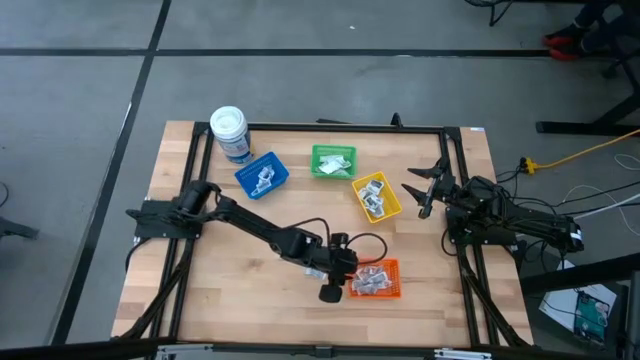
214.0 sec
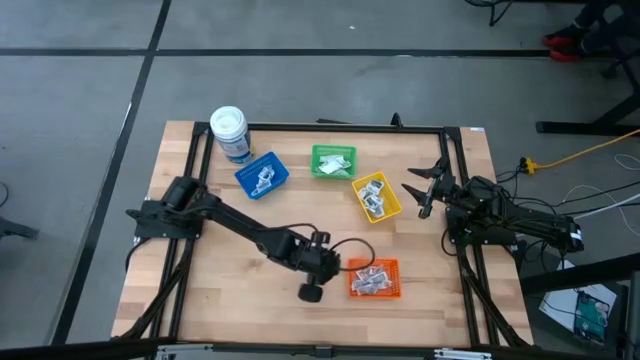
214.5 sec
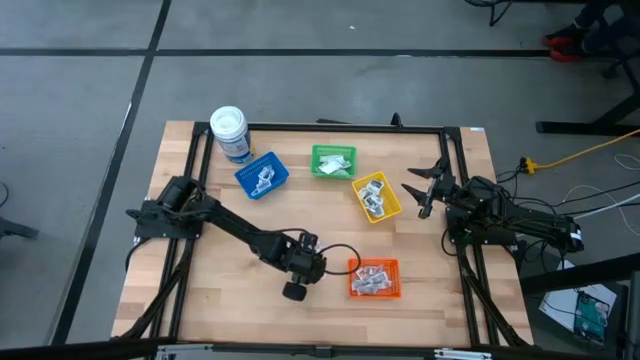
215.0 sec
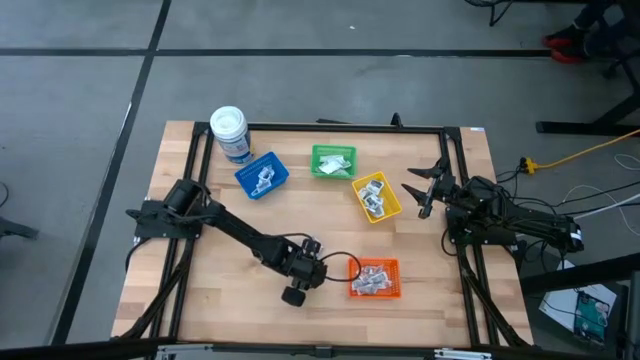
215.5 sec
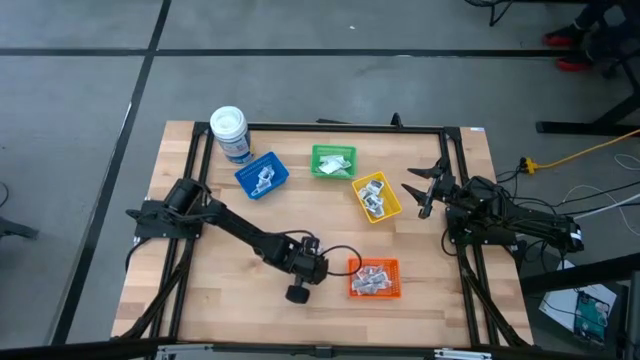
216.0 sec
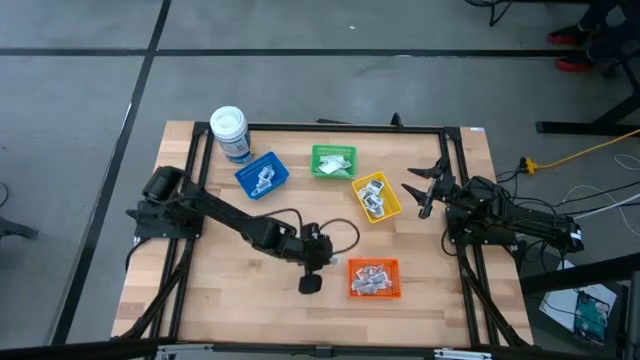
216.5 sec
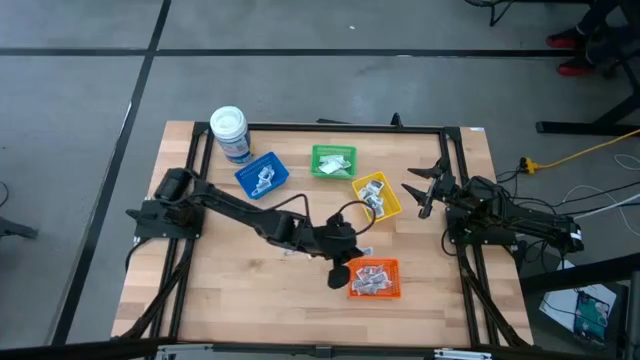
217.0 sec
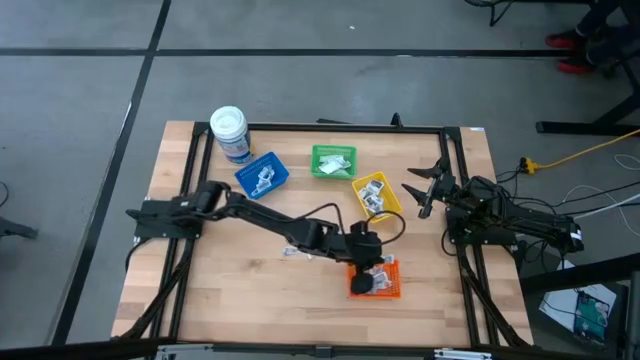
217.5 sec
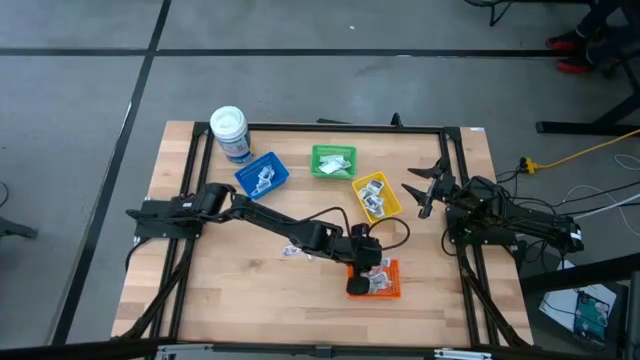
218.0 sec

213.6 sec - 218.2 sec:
Task: Pick & Place First Aid Supplies
Put the white ointment pack into the orange bin

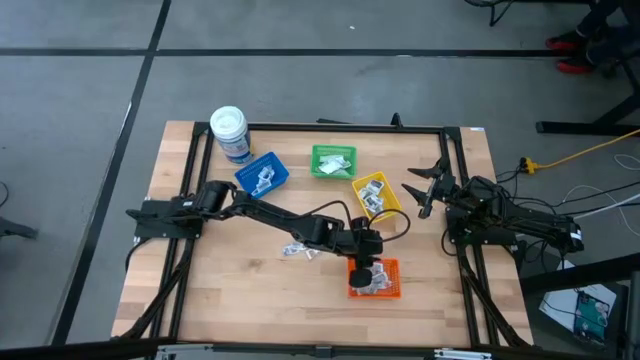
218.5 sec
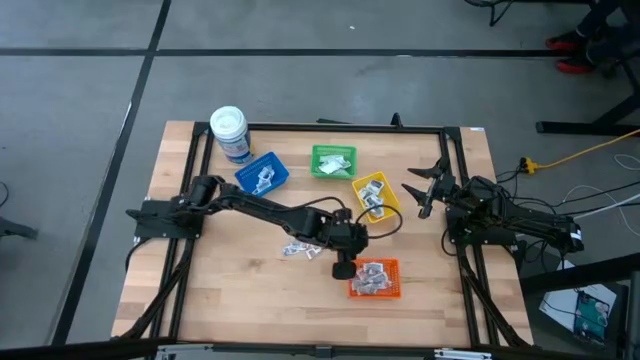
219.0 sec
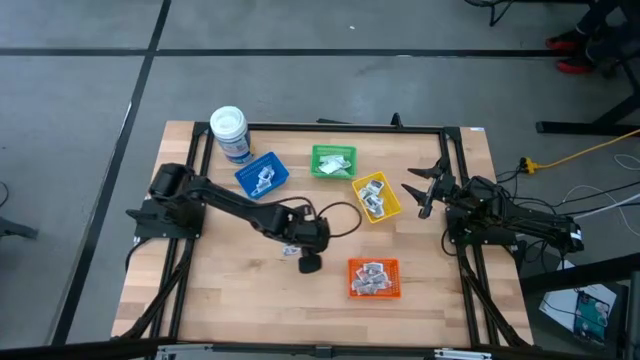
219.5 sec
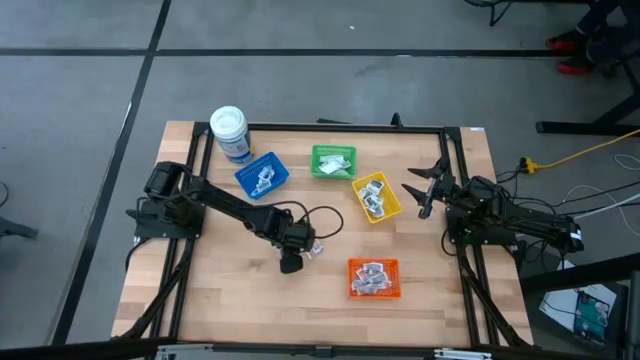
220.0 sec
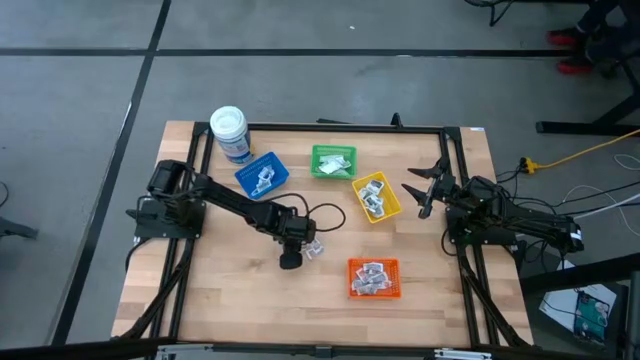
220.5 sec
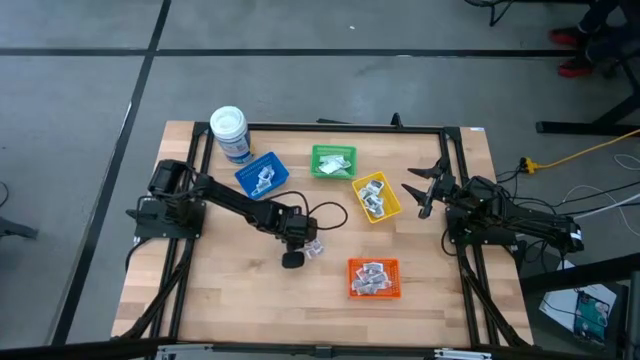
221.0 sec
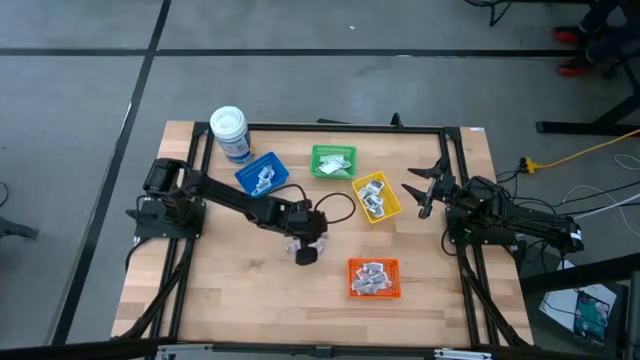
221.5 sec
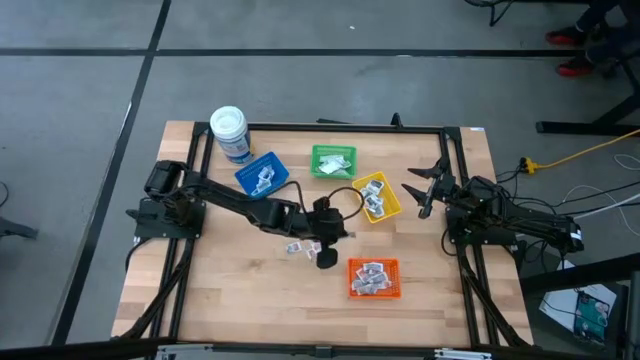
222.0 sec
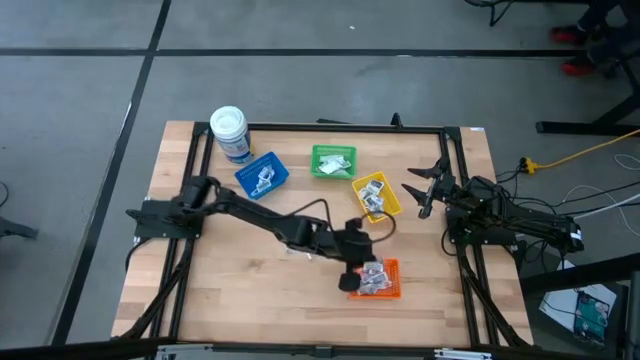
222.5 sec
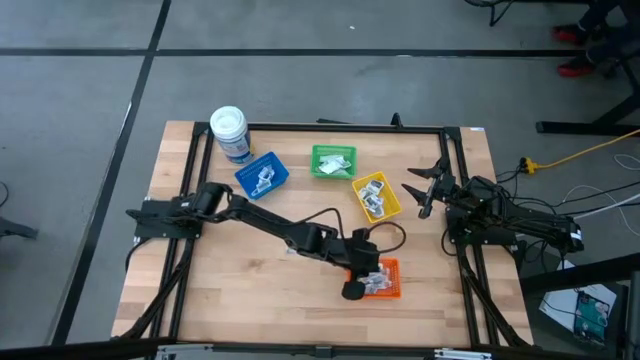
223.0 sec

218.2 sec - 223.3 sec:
Put the white ointment pack into the orange bin

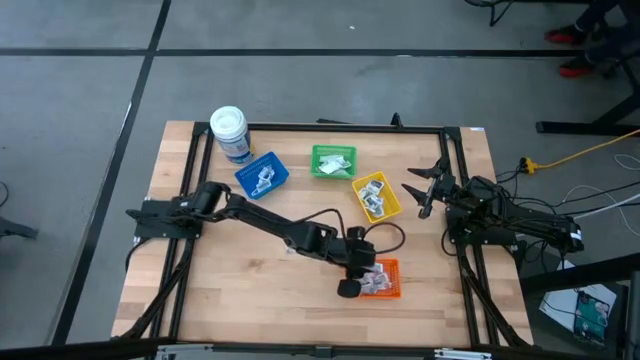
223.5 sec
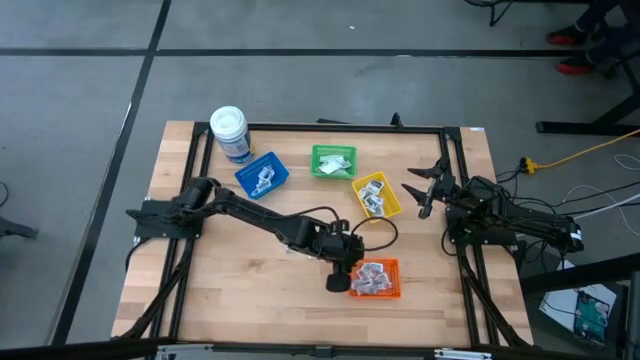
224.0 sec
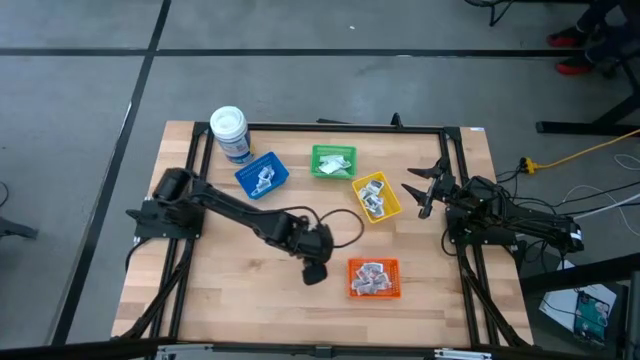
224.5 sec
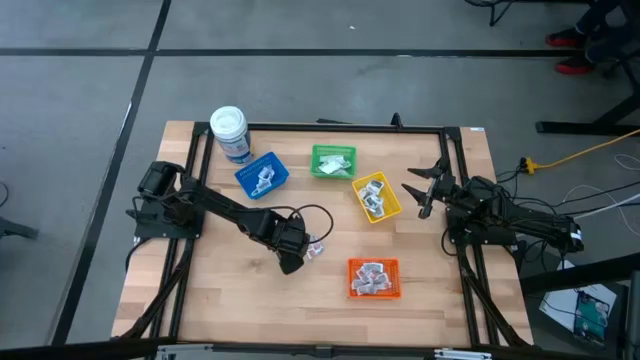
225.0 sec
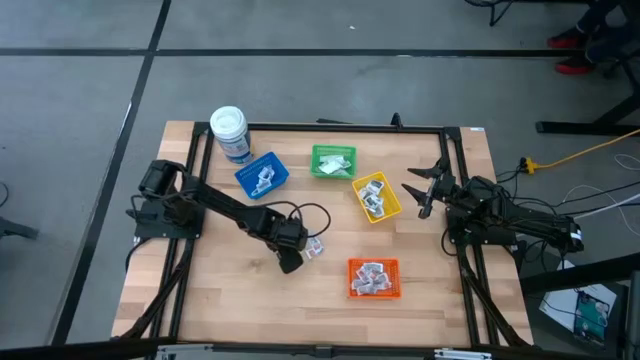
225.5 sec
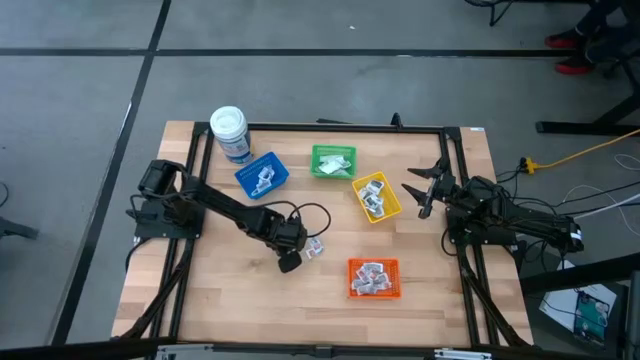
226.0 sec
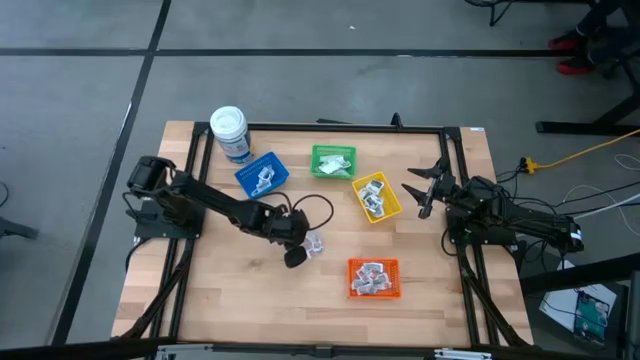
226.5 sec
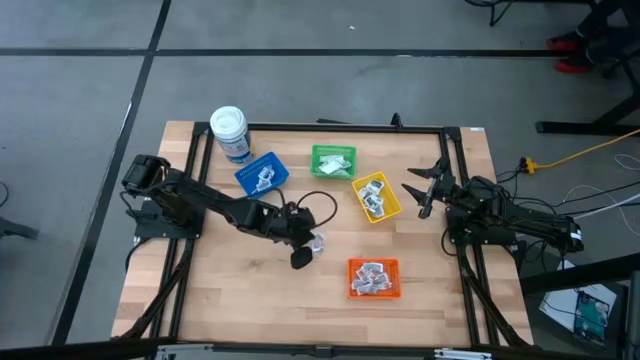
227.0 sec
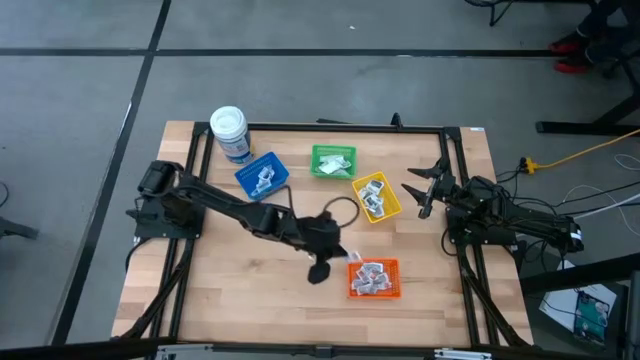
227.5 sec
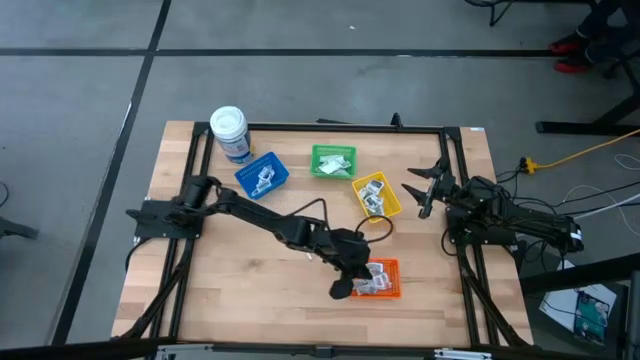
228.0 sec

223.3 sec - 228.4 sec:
Put the white ointment pack into the orange bin

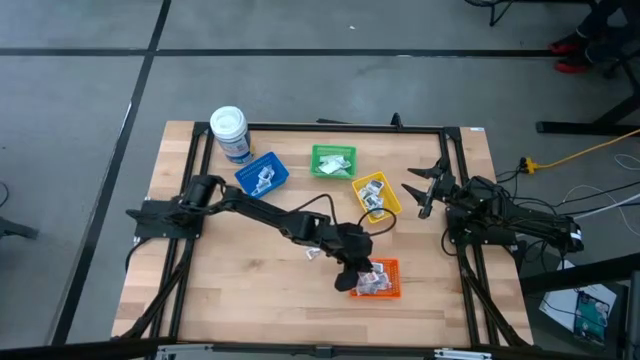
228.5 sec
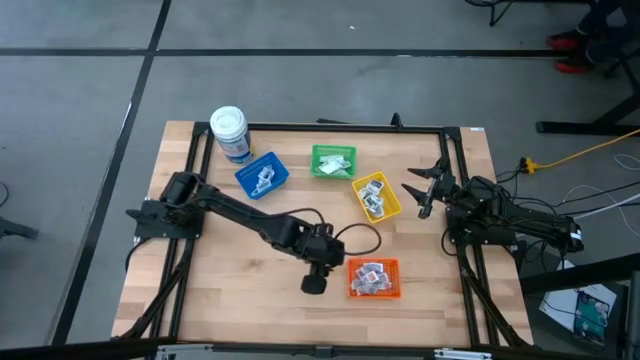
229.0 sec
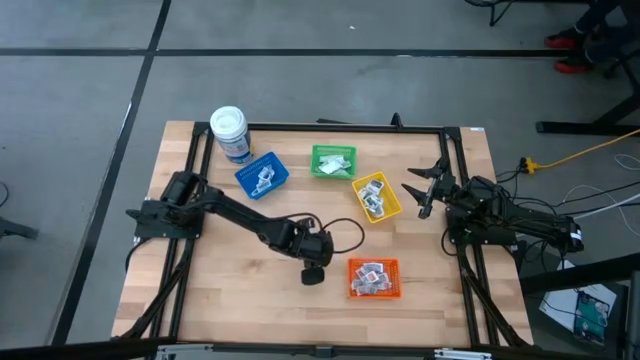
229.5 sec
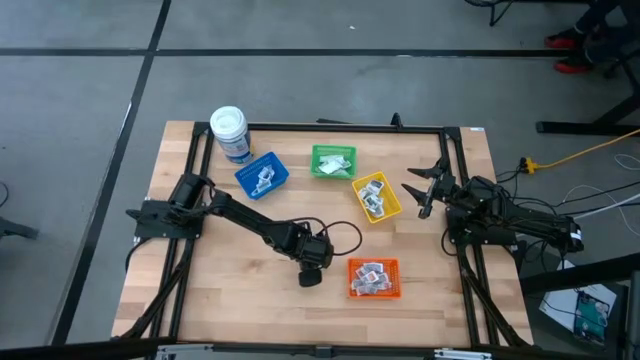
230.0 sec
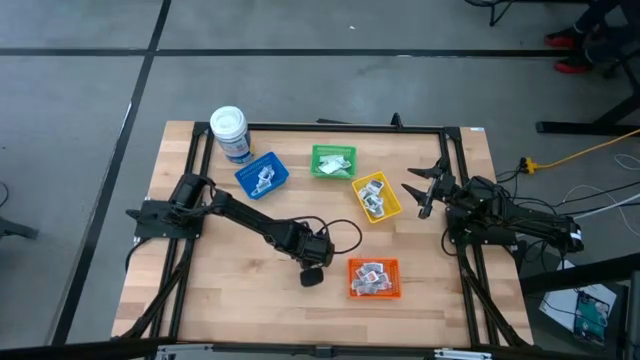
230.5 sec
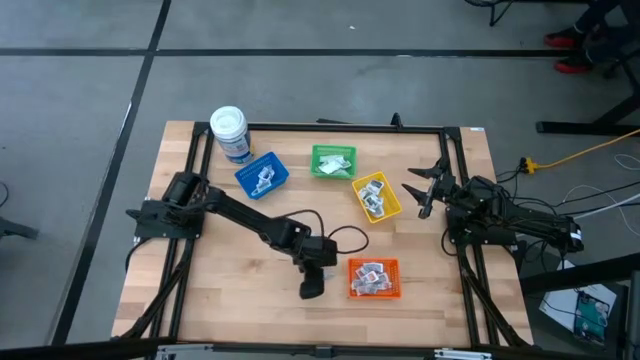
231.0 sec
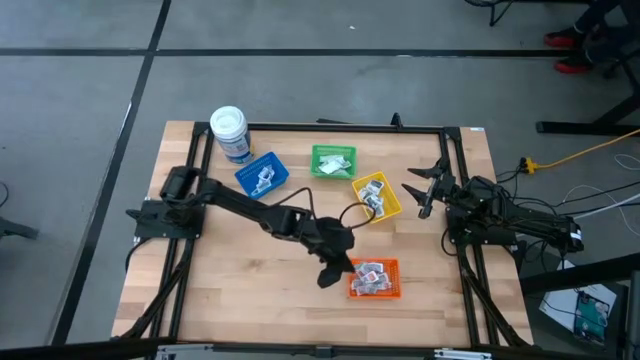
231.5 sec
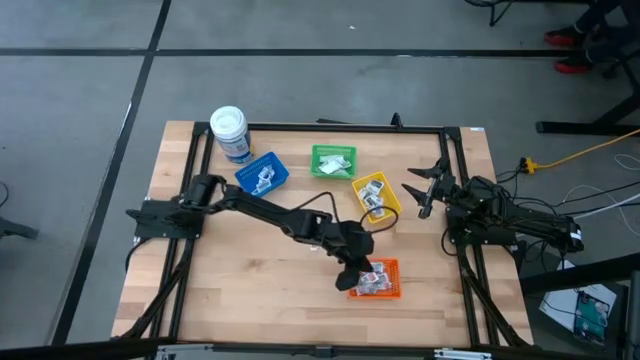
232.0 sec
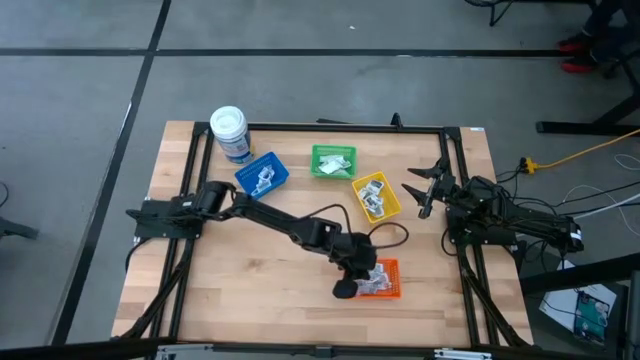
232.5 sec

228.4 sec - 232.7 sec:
Put the white ointment pack into the orange bin

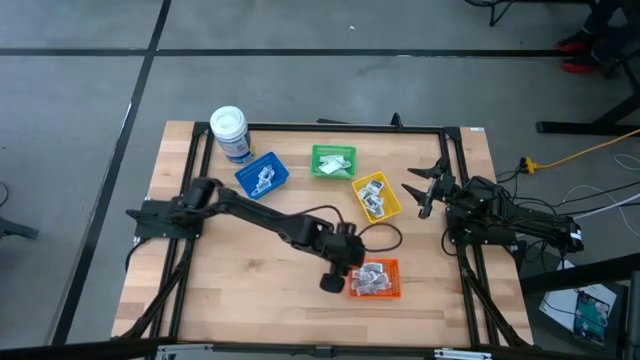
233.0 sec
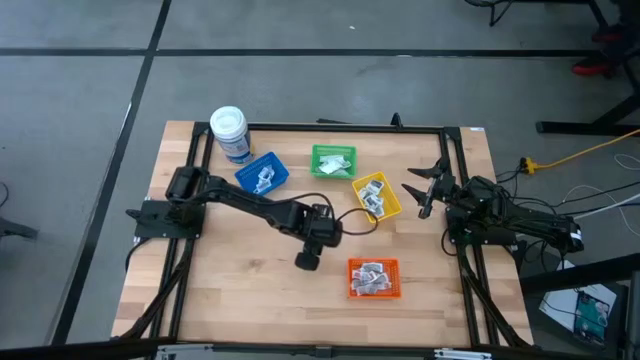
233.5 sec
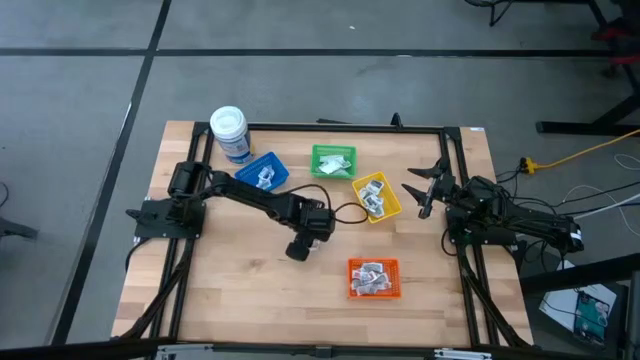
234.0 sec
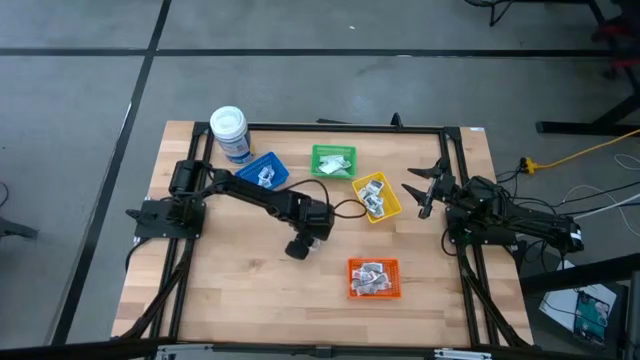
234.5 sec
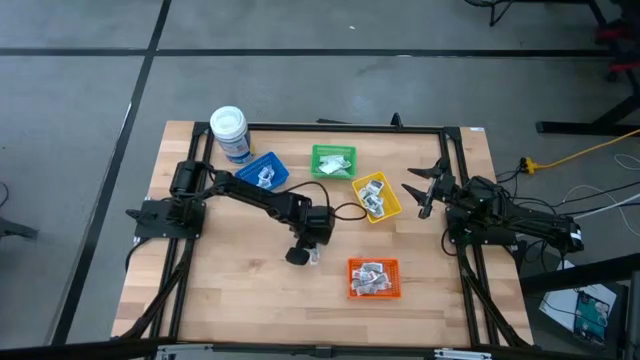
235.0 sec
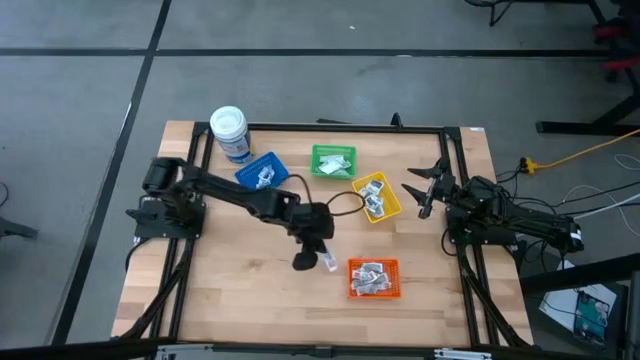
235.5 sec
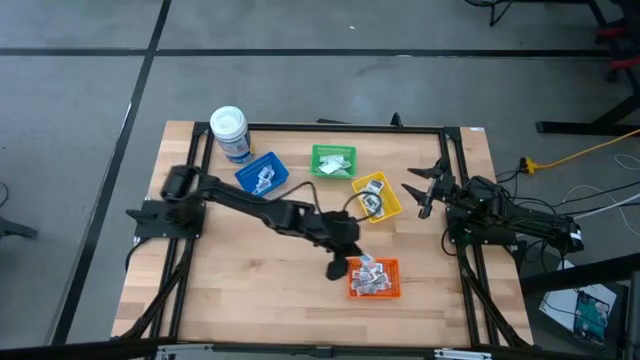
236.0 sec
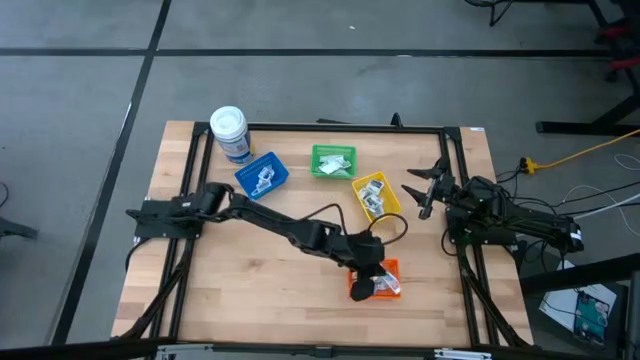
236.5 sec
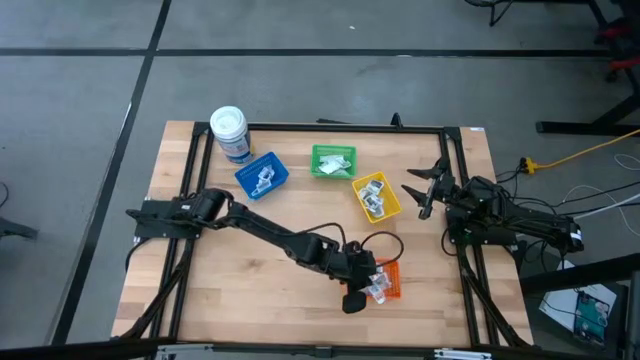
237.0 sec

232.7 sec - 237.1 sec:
Put the white ointment pack into the orange bin
